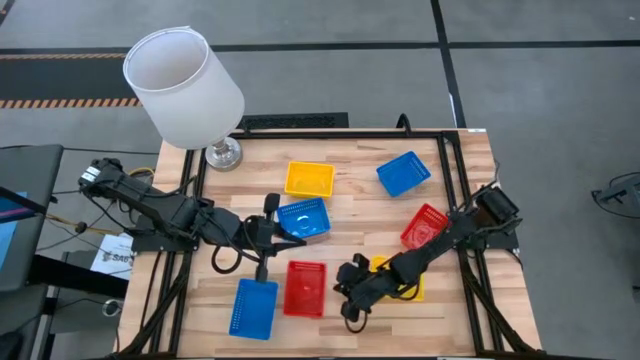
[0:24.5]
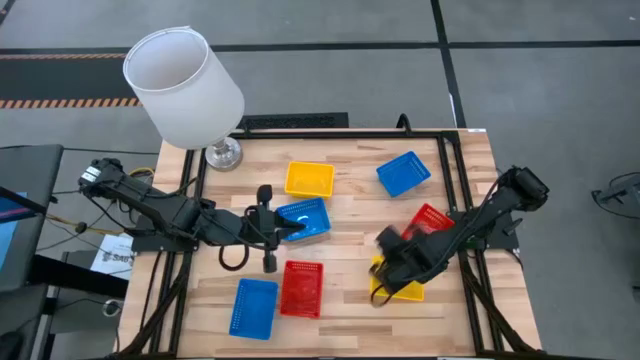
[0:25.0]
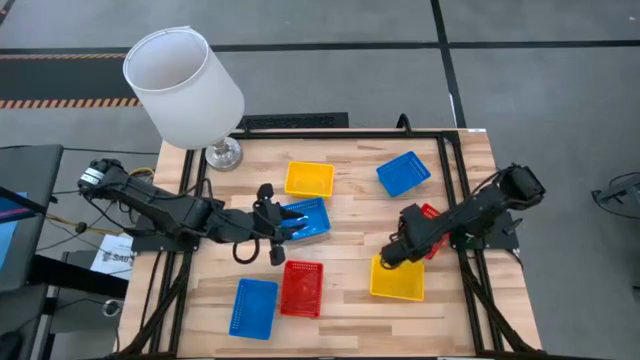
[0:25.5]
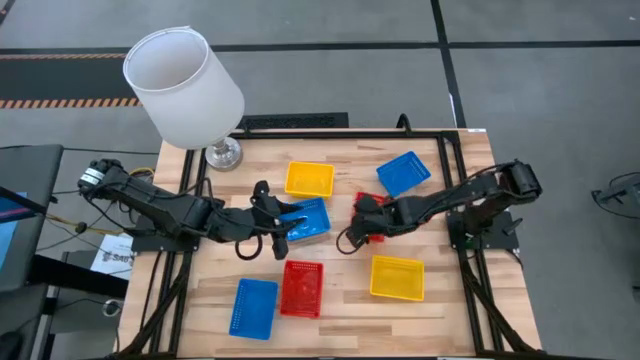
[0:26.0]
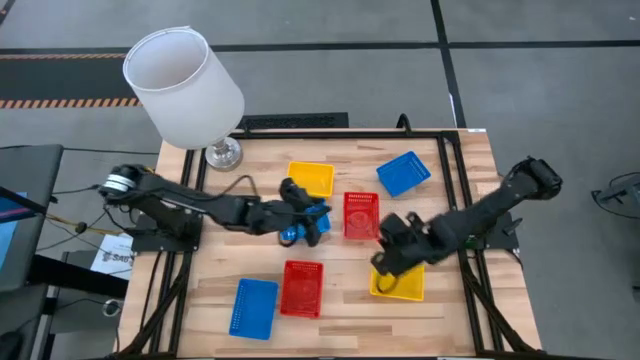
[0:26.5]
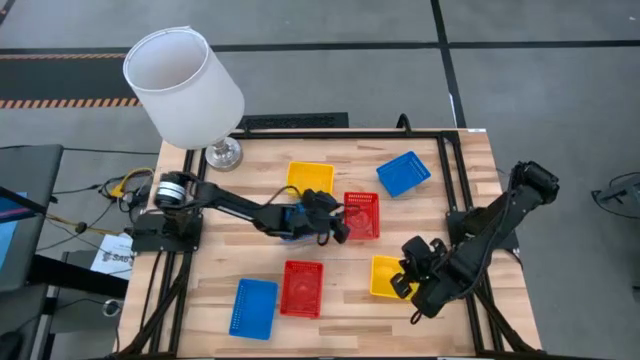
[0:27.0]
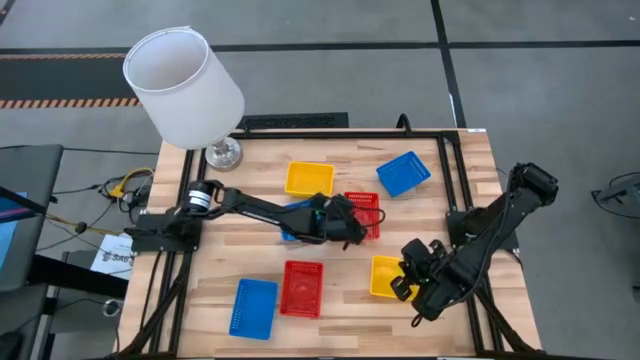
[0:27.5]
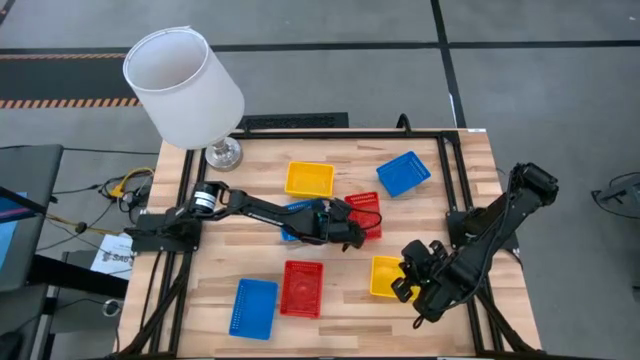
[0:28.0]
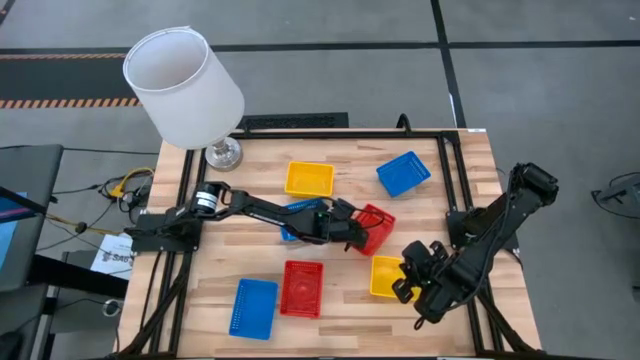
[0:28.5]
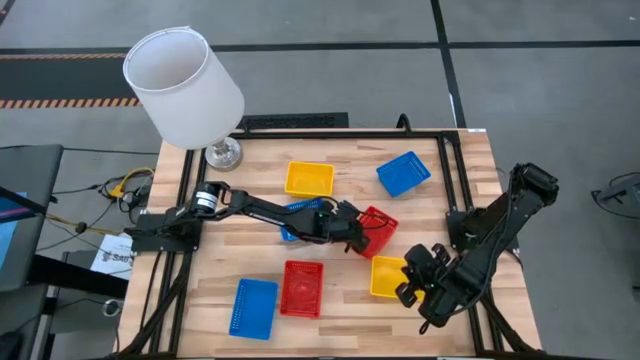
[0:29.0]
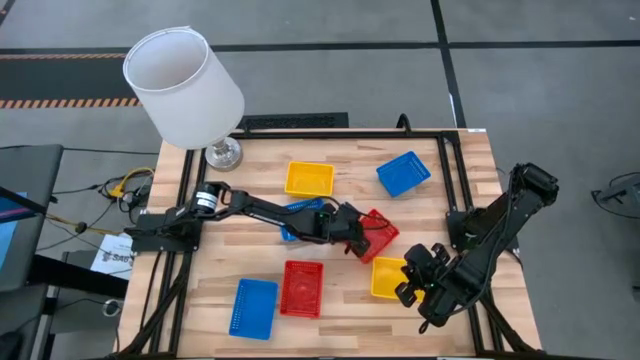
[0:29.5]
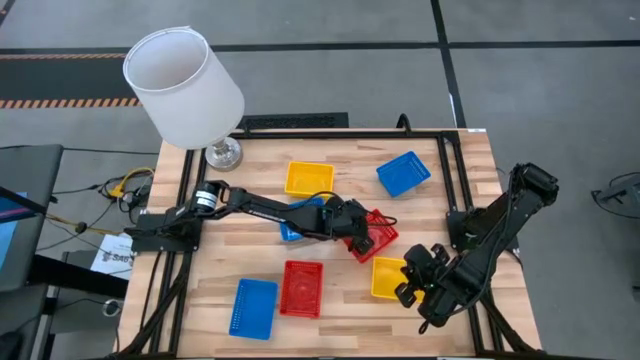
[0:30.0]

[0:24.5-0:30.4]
Stack the right red bin on top of the left red bin

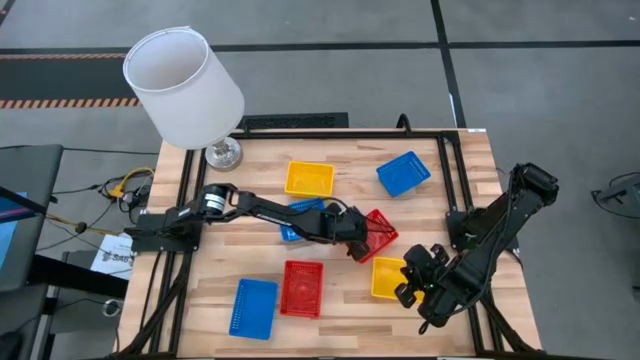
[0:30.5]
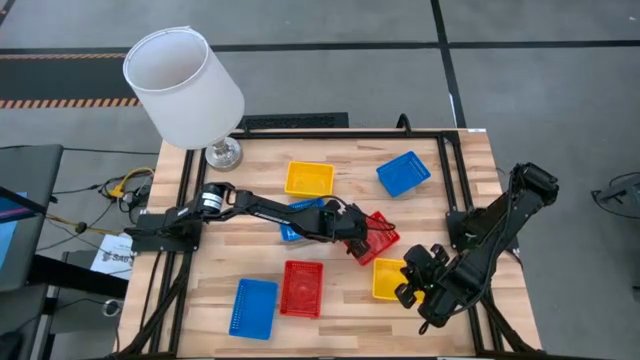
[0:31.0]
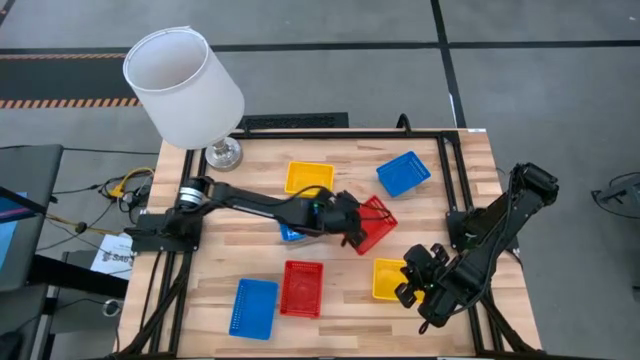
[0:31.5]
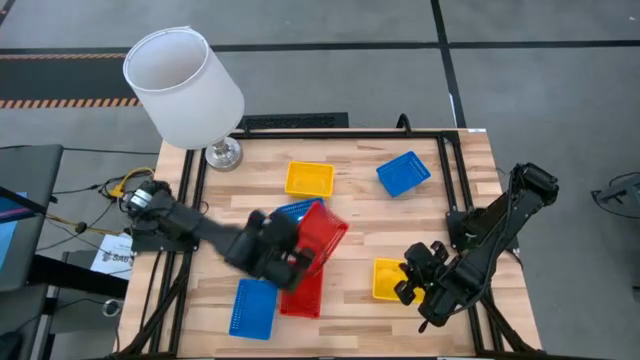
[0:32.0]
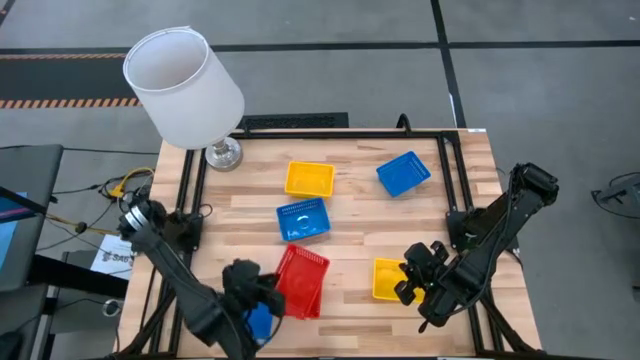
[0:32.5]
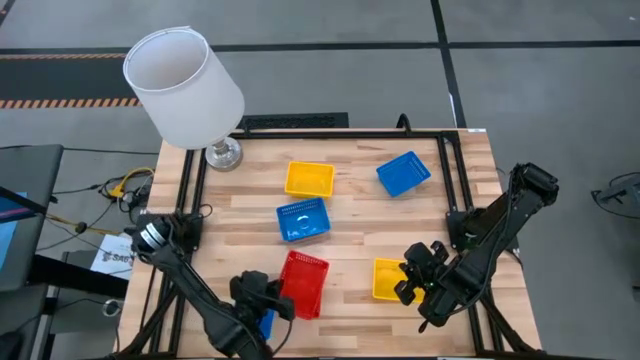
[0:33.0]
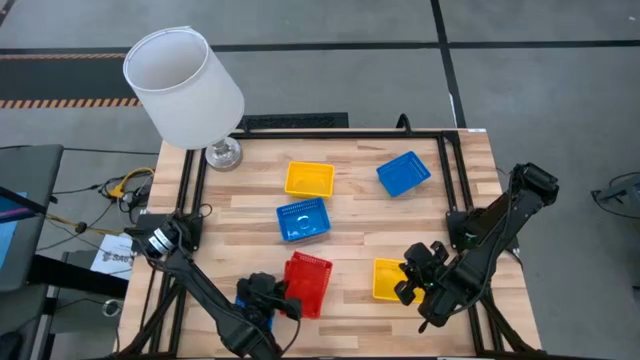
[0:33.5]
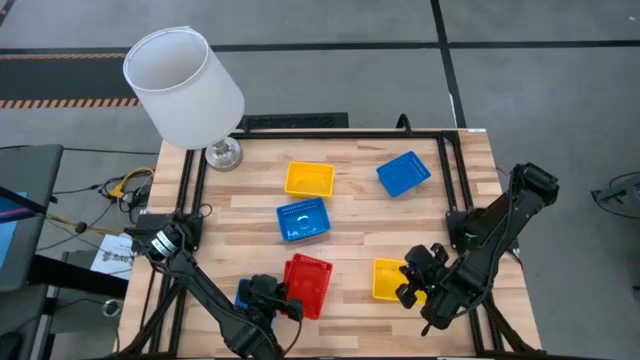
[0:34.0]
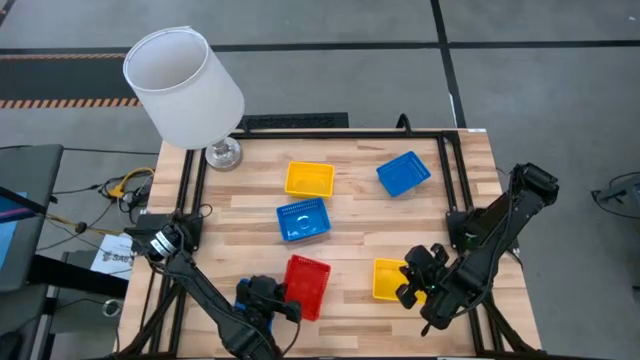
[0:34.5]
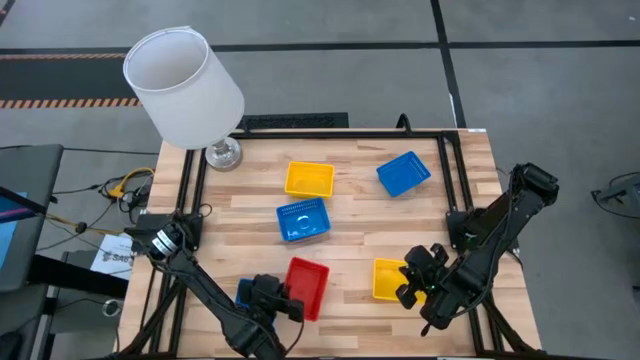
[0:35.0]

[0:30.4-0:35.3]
Stack the right red bin on top of the left red bin

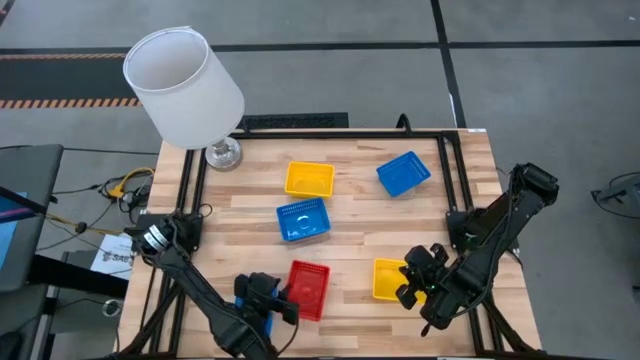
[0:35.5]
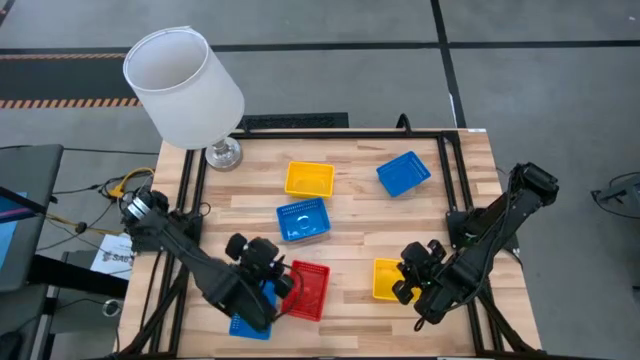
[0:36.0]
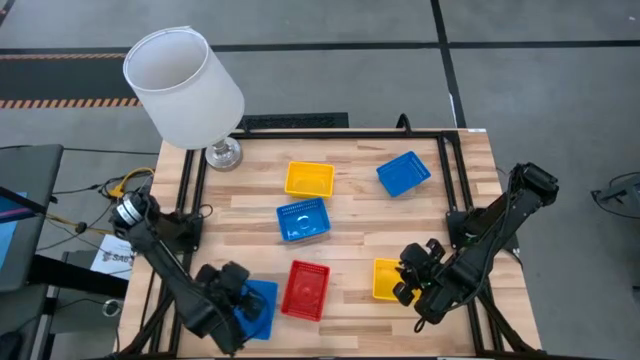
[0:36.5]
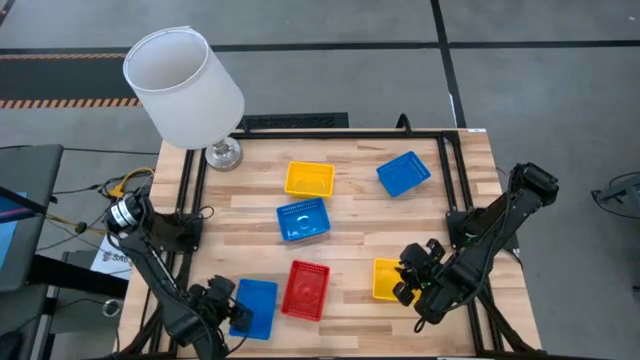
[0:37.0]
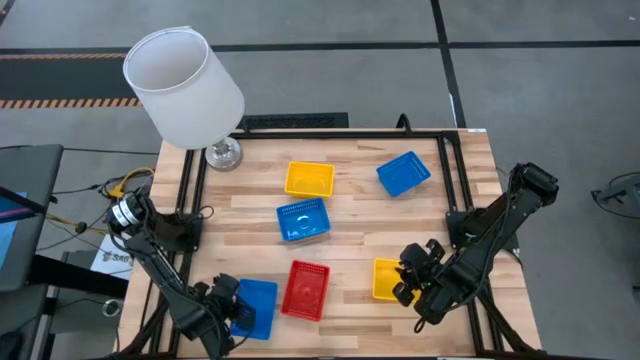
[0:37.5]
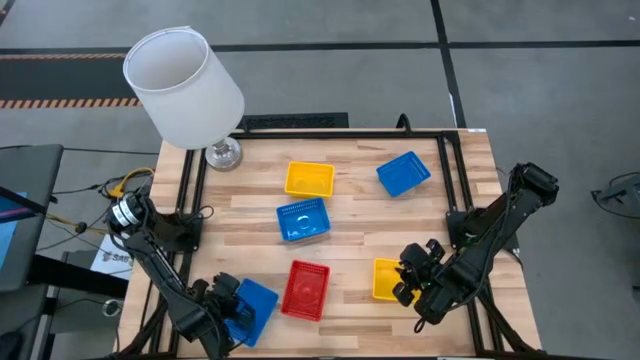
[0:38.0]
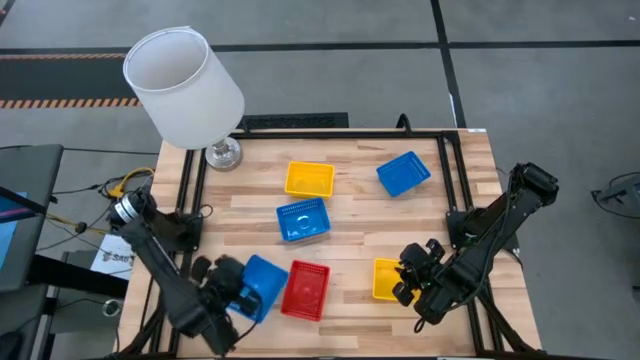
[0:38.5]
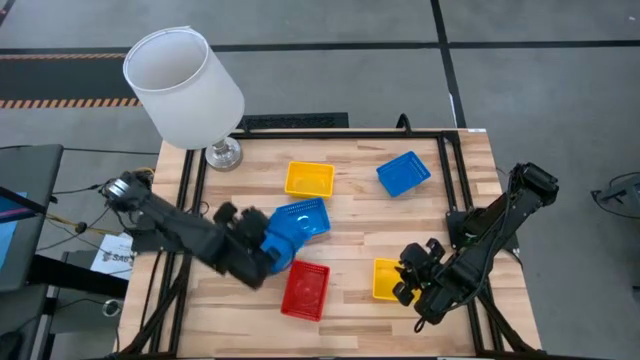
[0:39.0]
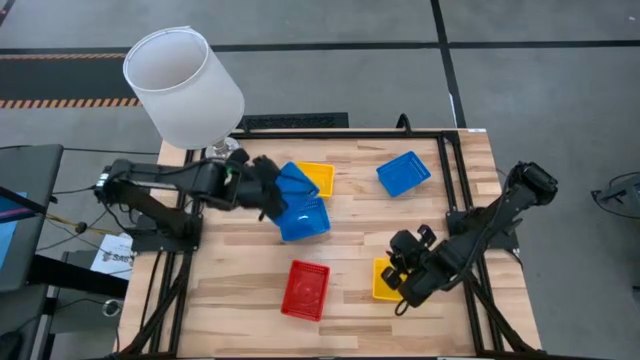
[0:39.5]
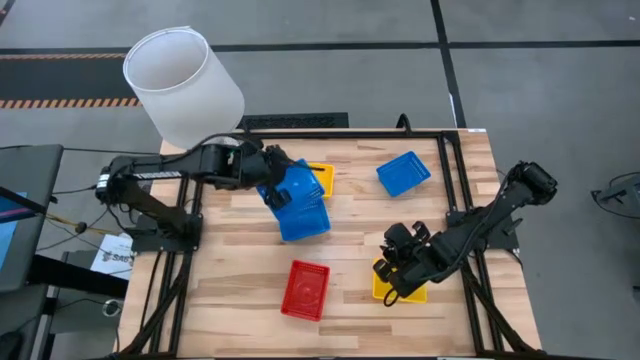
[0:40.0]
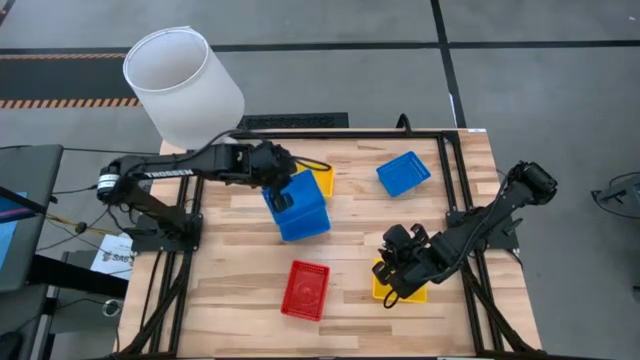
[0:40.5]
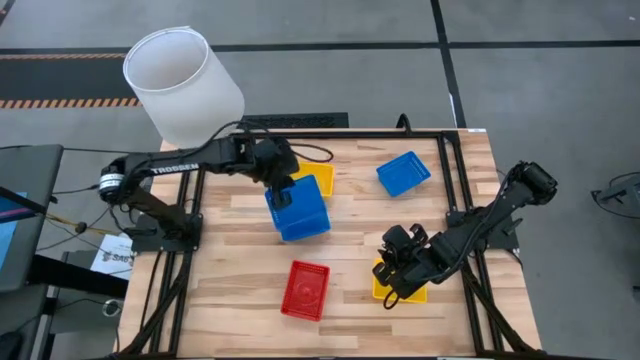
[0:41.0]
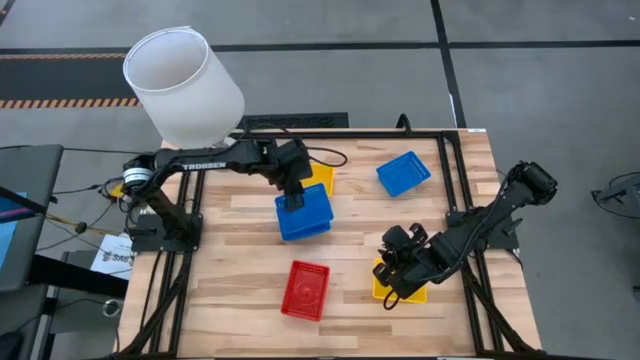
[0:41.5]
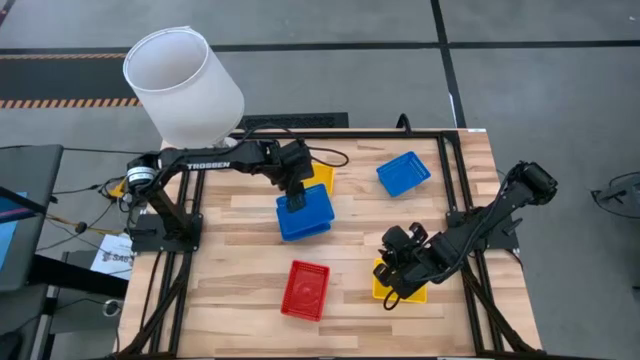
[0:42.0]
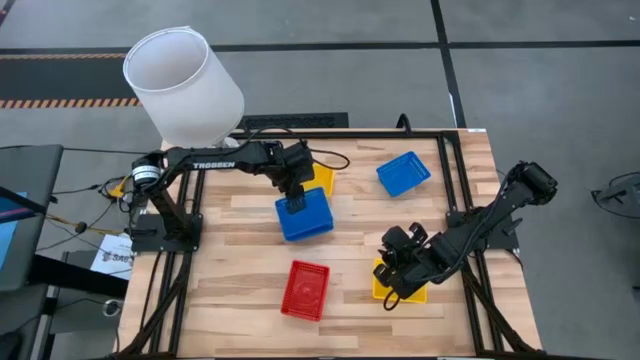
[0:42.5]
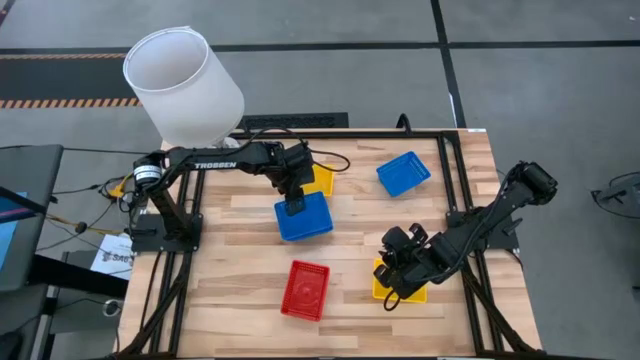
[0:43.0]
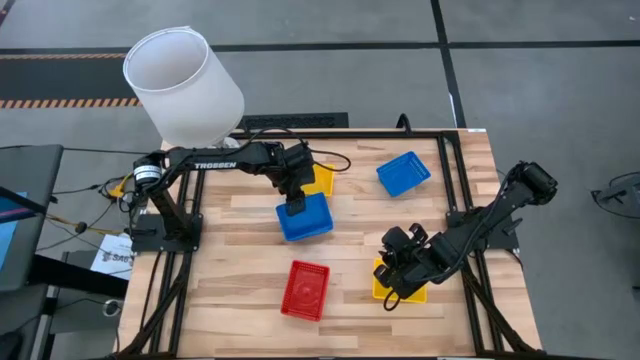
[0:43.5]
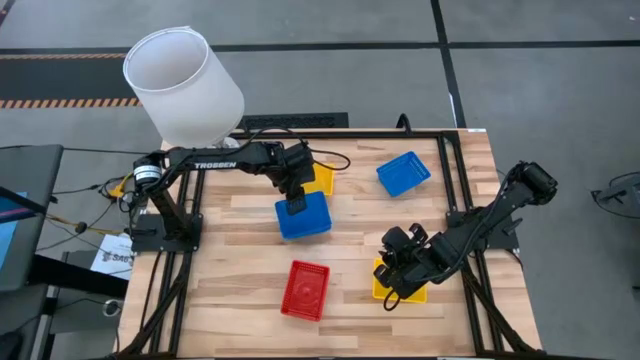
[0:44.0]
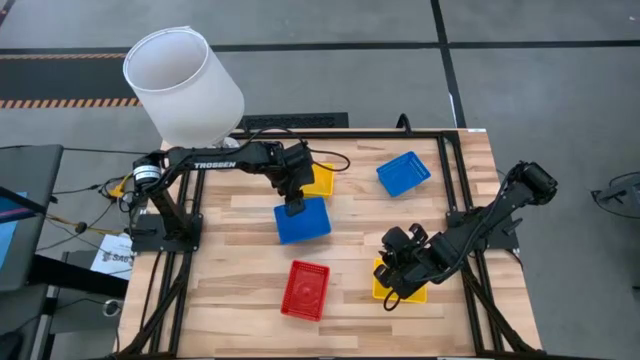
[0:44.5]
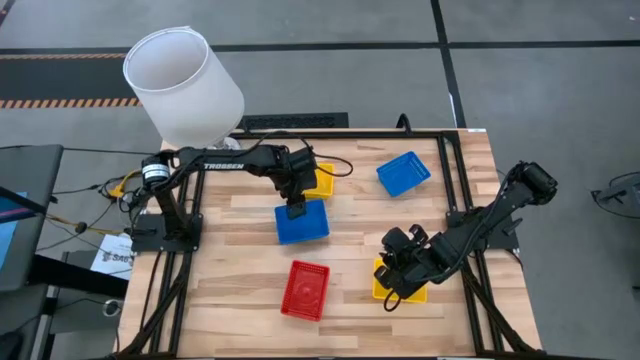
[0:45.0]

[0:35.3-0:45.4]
Stack the bottom blue bin on top of the middle blue bin
